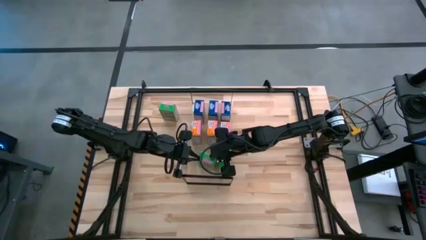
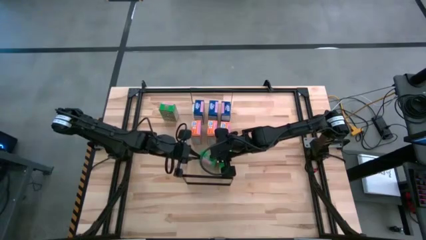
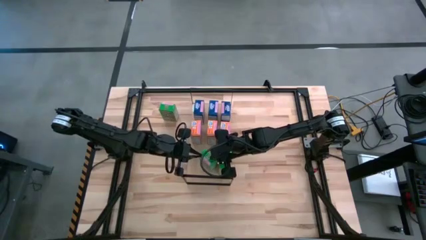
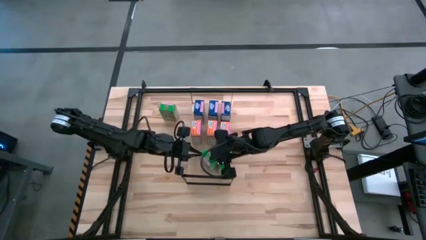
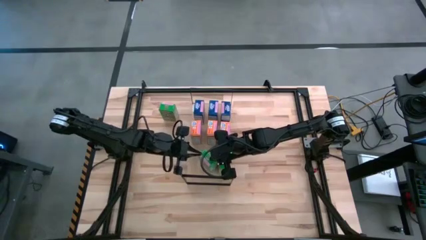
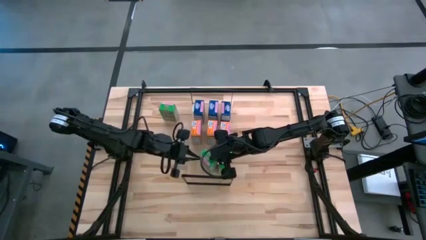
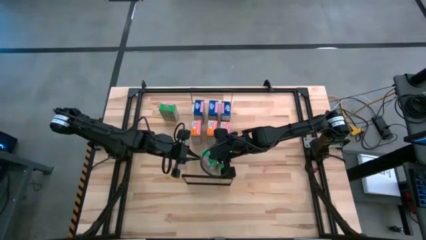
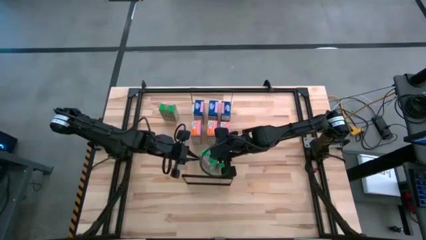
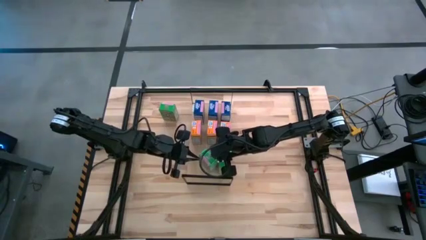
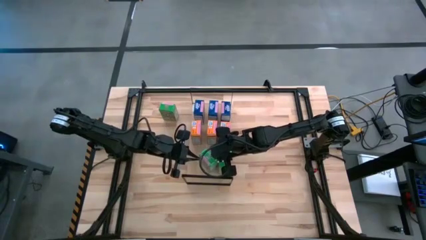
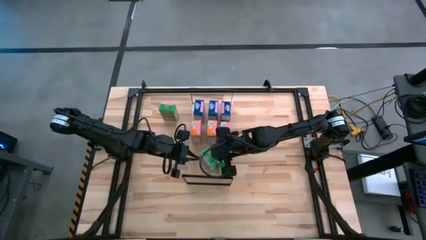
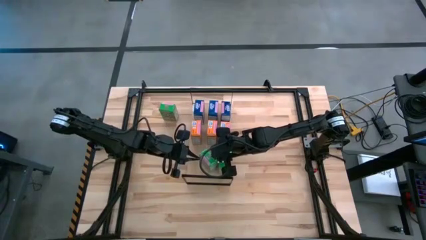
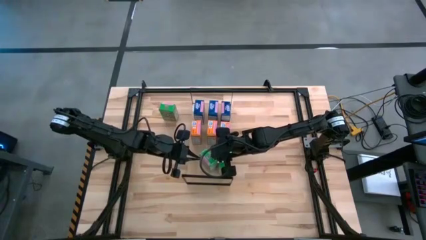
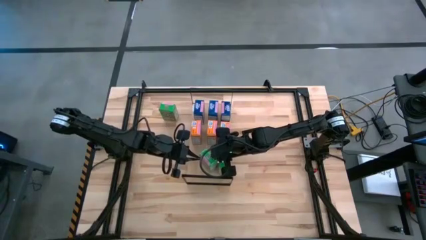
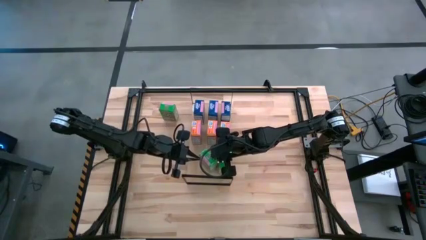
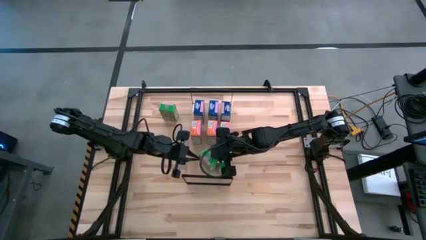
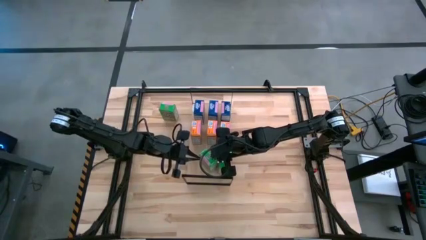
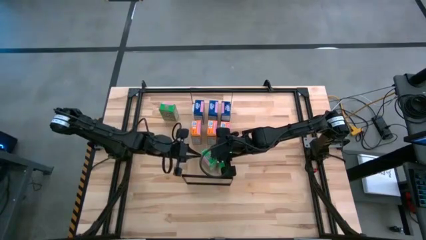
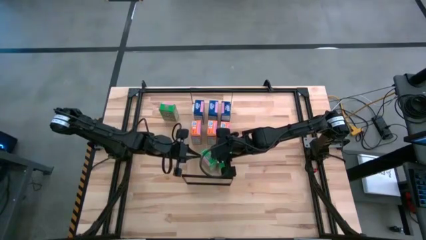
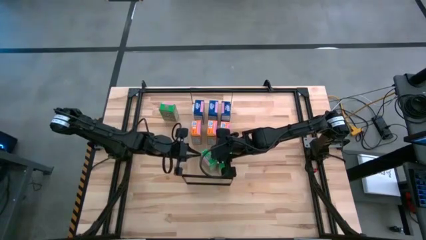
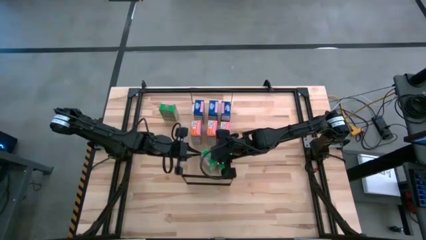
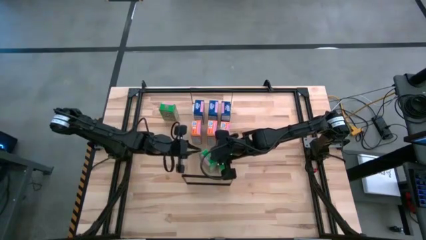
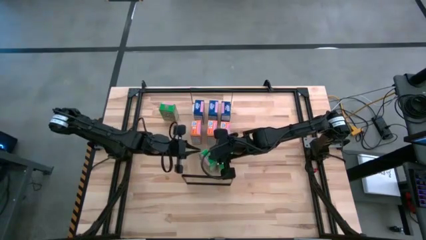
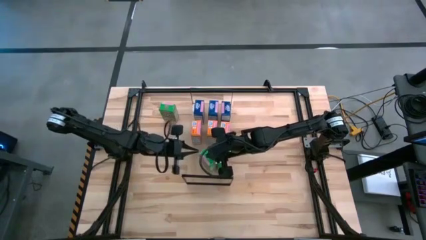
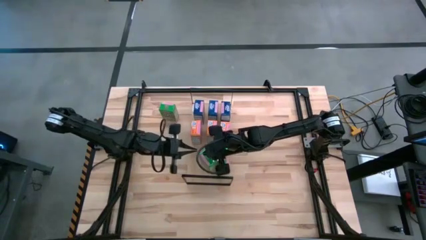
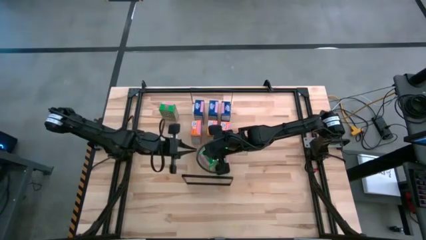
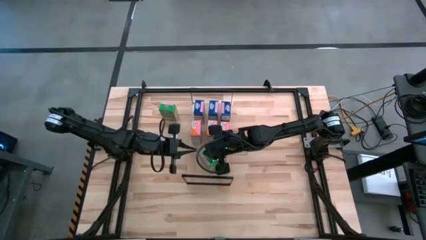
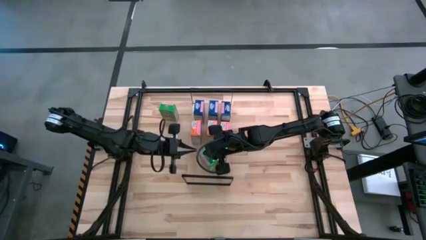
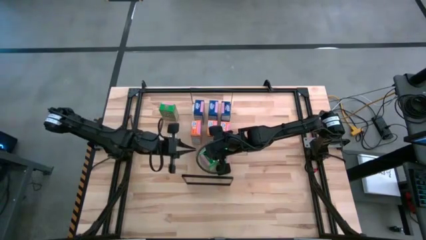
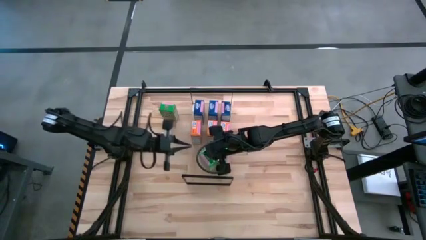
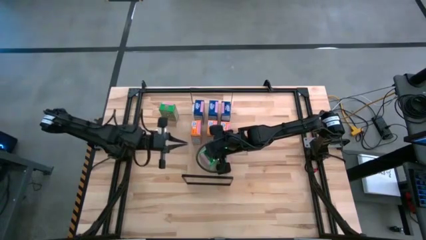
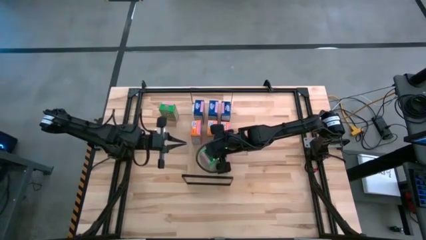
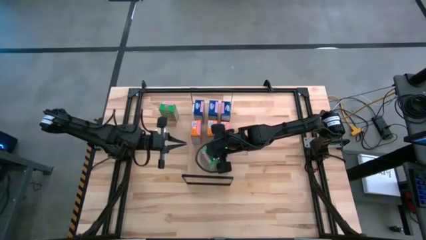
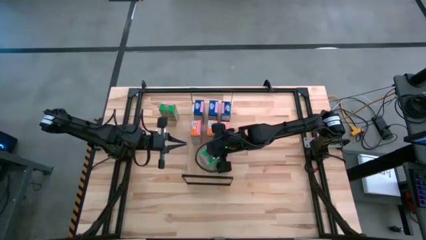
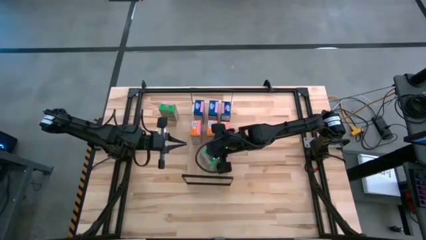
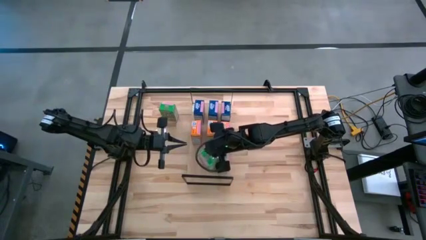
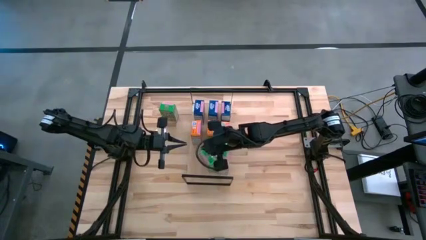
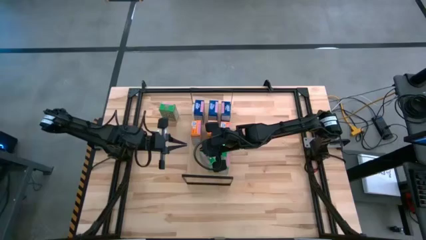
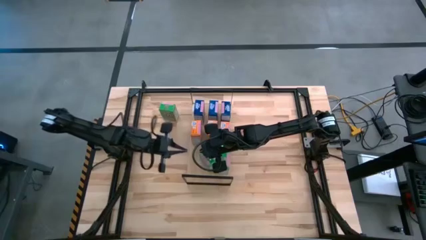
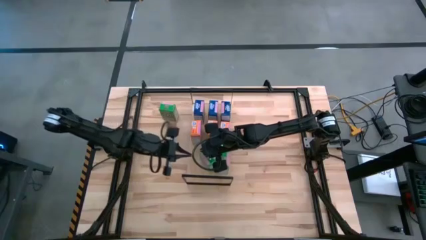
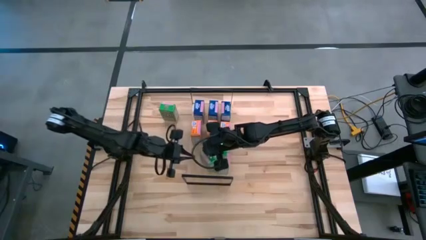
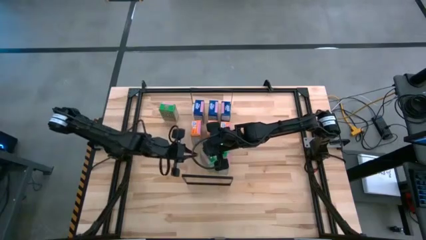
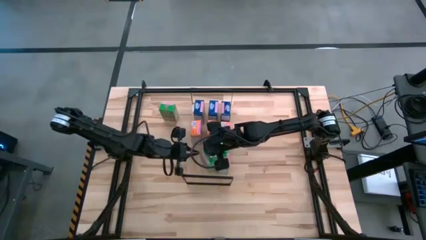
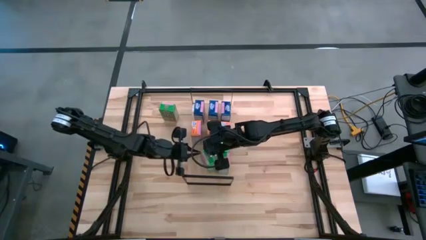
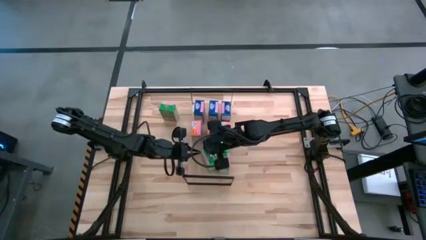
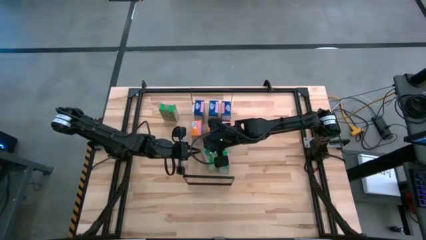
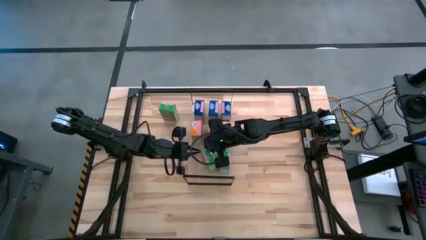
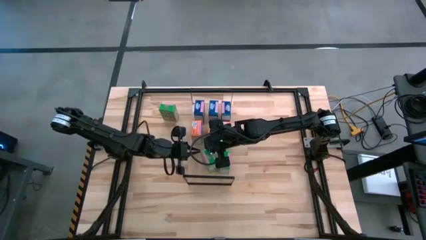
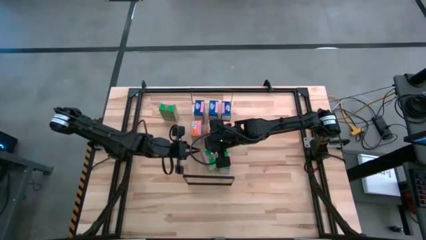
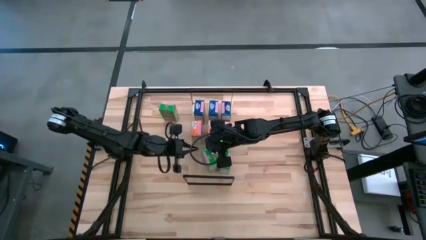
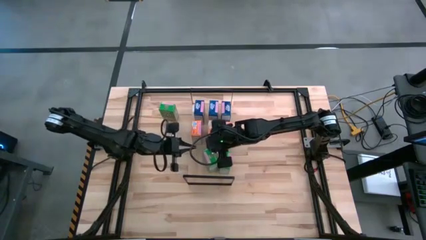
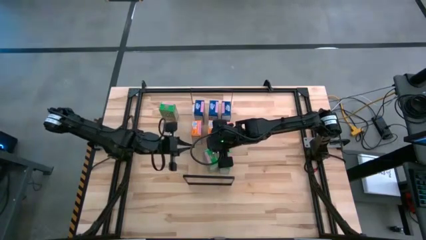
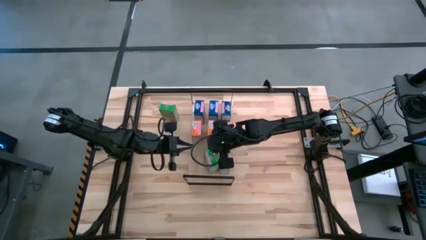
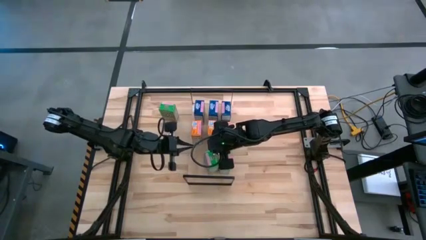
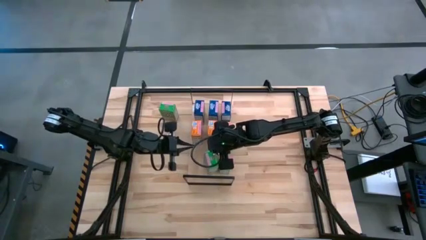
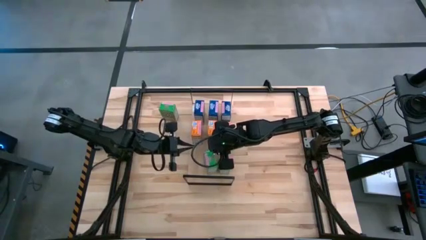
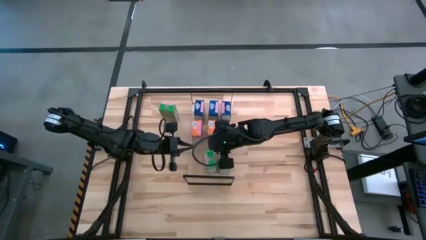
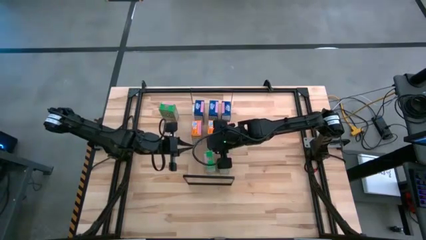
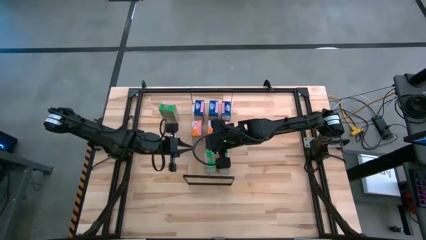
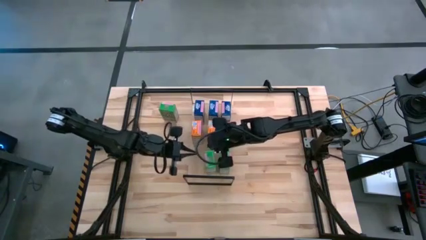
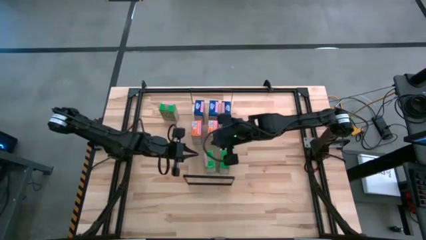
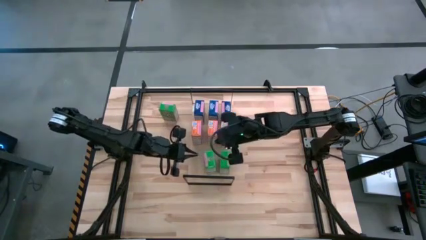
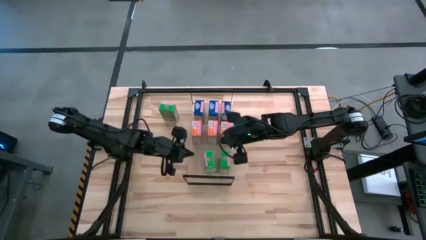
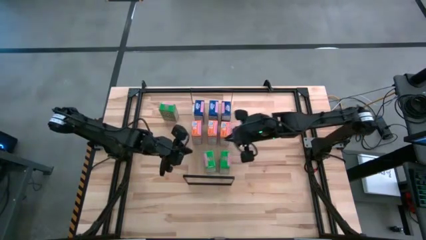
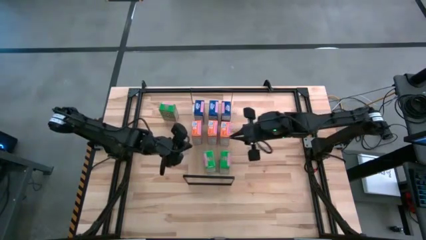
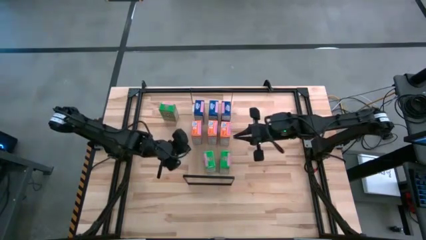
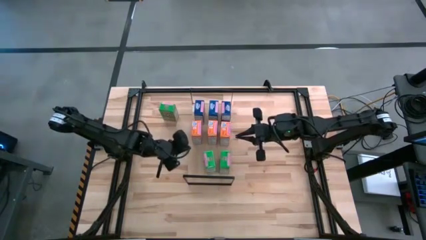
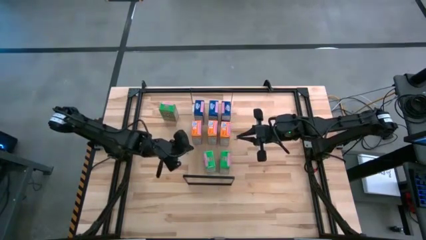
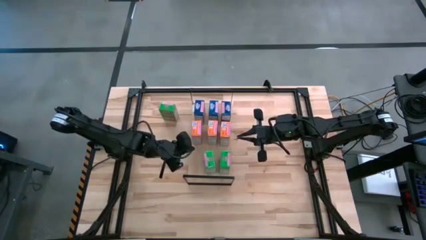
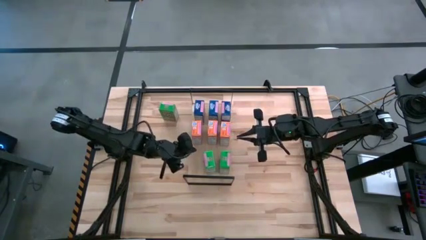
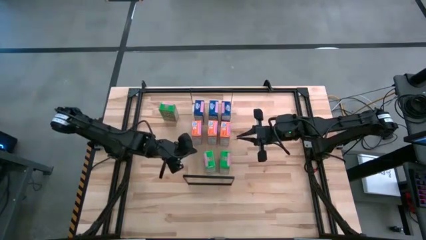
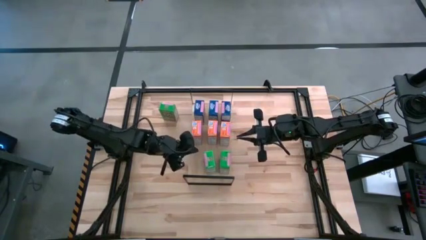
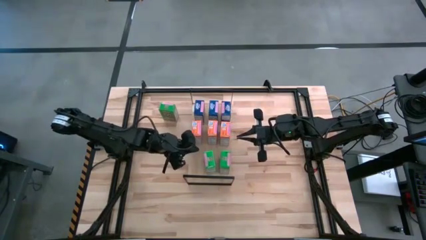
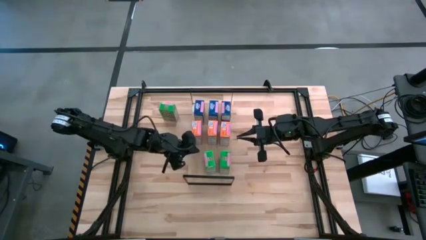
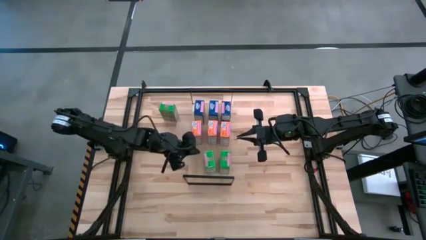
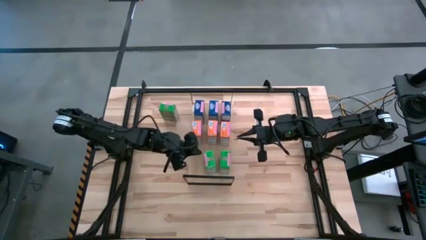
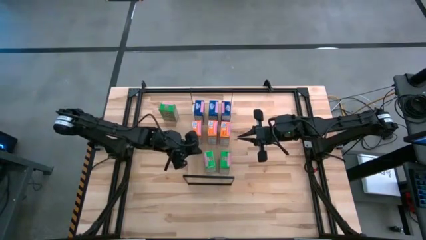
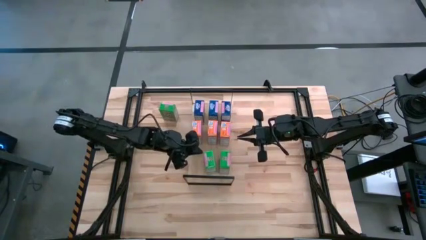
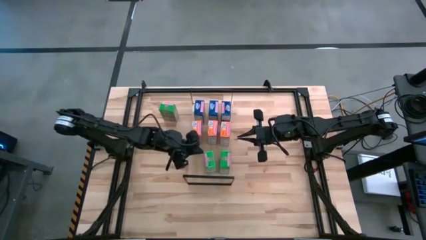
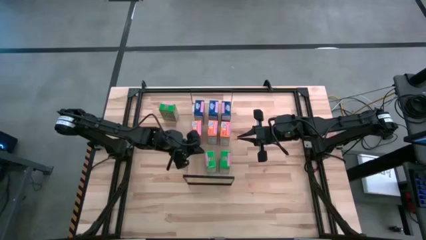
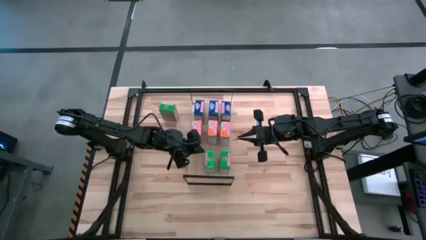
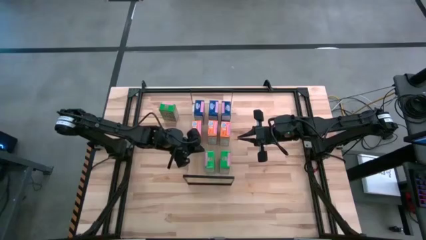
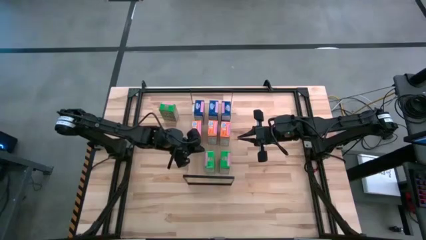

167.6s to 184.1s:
Task: Stack cereal on shelf
Put the bottom green cereal box on the shelf aligned with the other green cereal box
